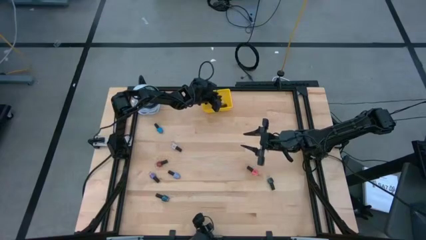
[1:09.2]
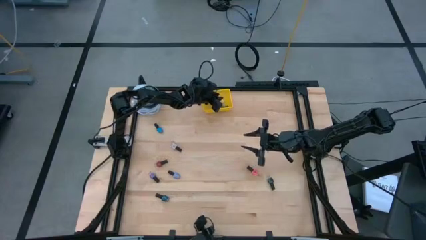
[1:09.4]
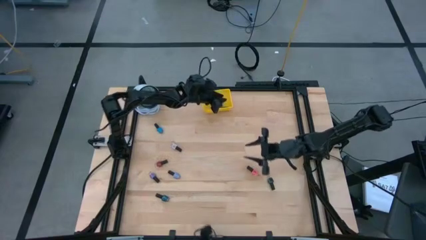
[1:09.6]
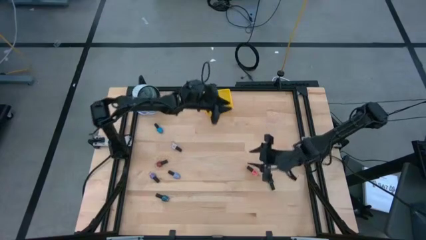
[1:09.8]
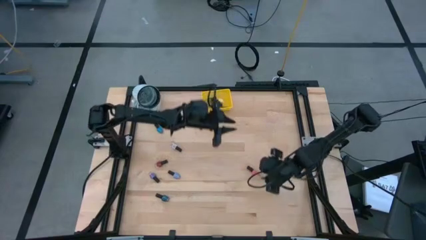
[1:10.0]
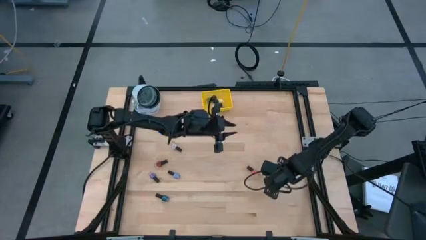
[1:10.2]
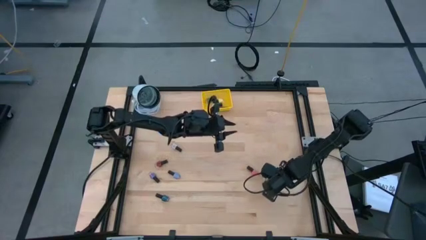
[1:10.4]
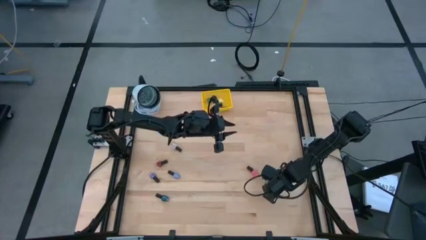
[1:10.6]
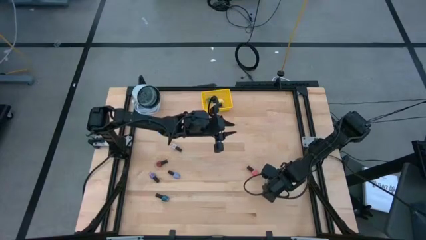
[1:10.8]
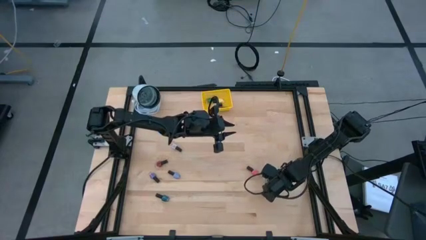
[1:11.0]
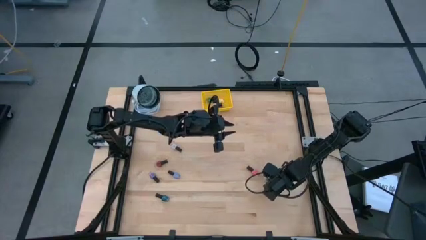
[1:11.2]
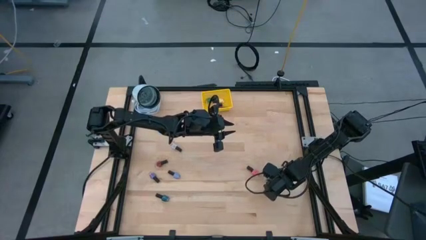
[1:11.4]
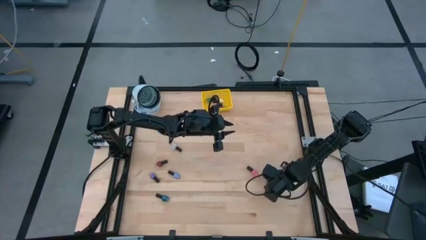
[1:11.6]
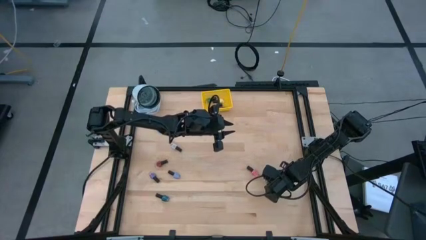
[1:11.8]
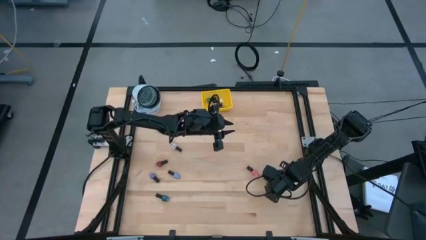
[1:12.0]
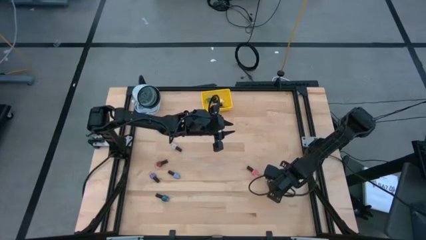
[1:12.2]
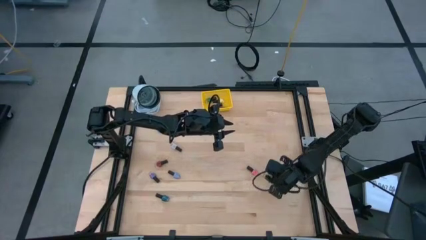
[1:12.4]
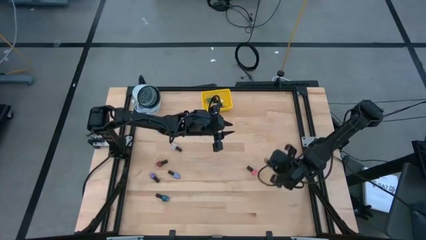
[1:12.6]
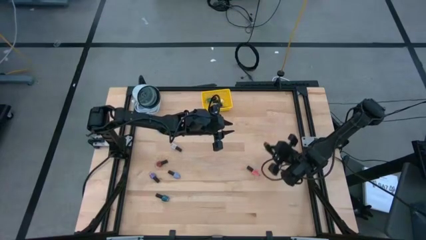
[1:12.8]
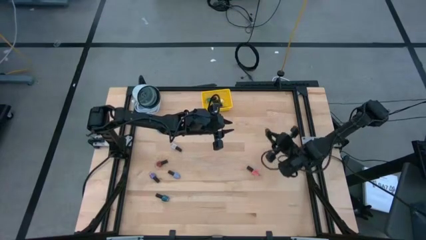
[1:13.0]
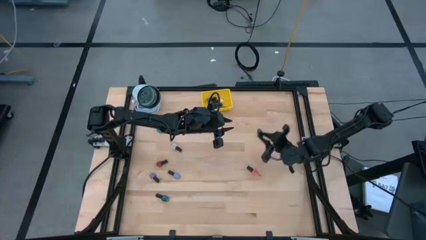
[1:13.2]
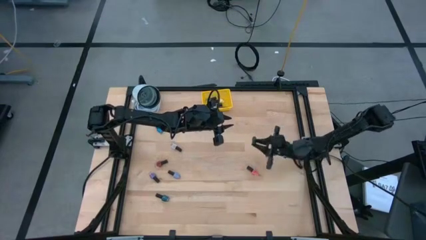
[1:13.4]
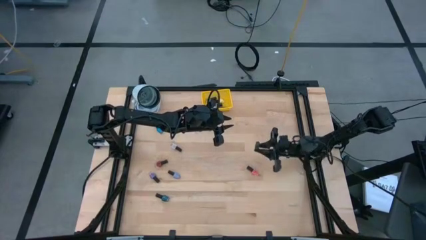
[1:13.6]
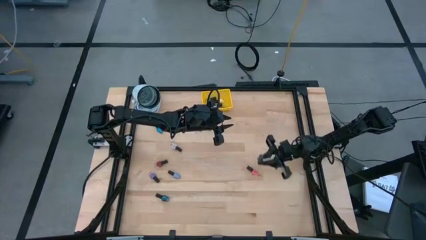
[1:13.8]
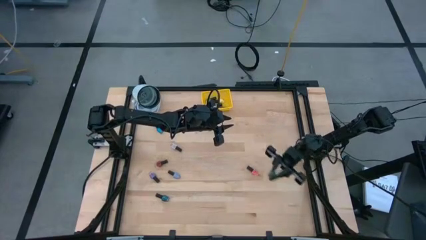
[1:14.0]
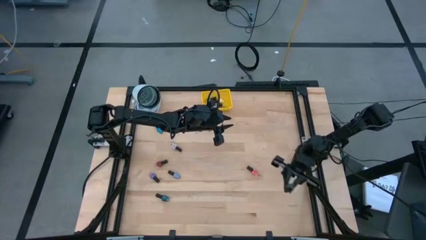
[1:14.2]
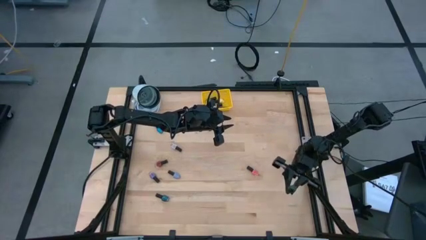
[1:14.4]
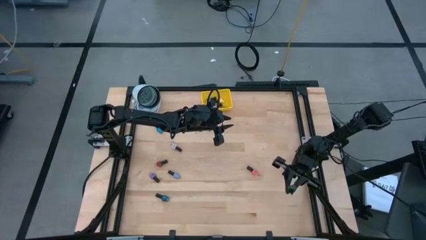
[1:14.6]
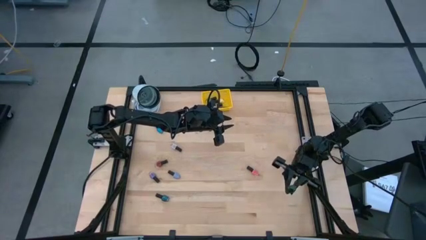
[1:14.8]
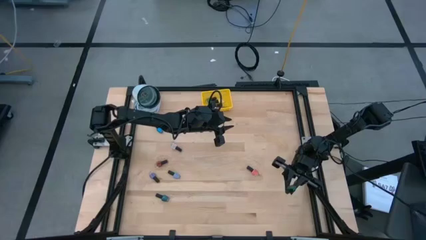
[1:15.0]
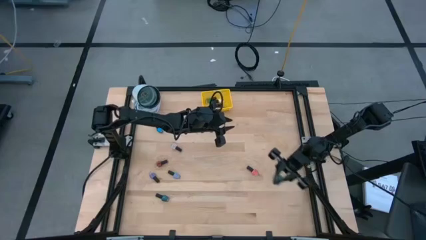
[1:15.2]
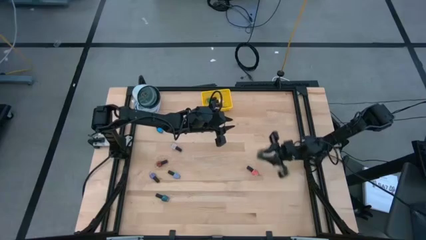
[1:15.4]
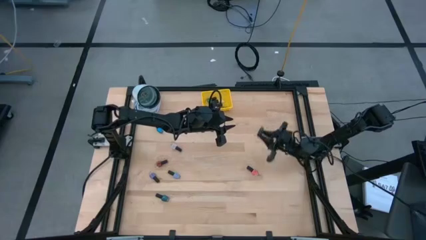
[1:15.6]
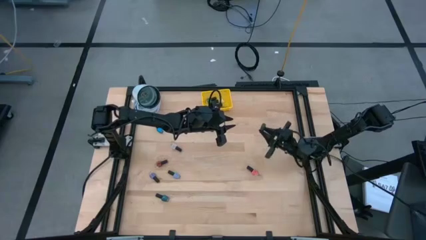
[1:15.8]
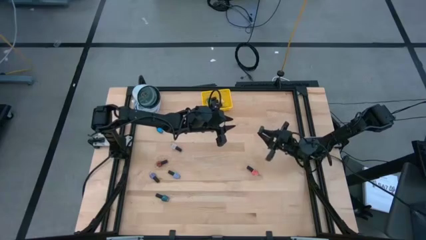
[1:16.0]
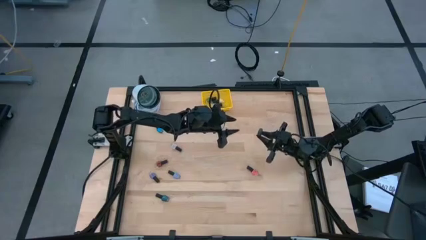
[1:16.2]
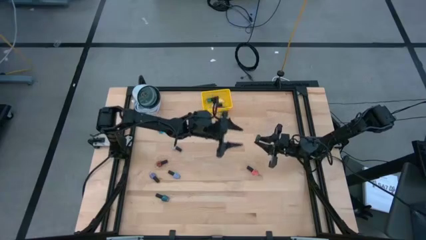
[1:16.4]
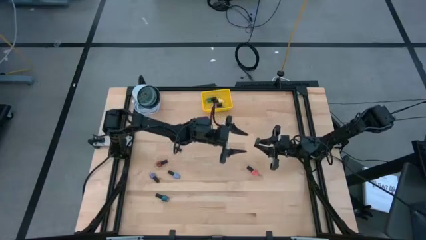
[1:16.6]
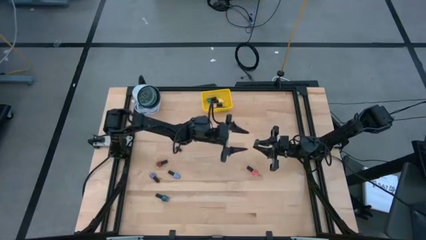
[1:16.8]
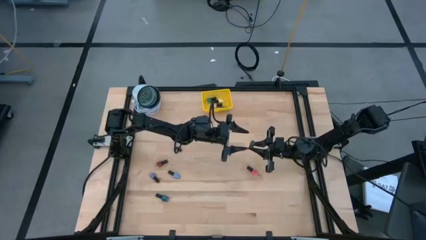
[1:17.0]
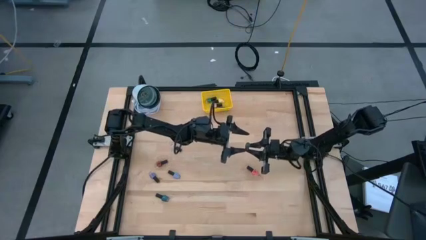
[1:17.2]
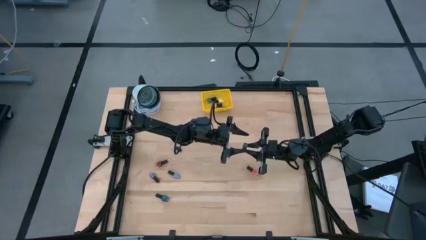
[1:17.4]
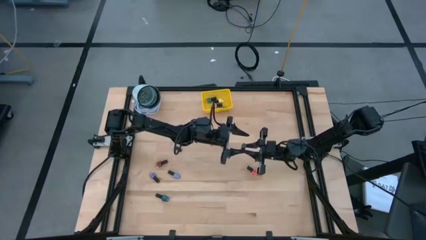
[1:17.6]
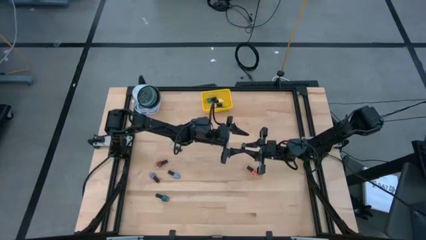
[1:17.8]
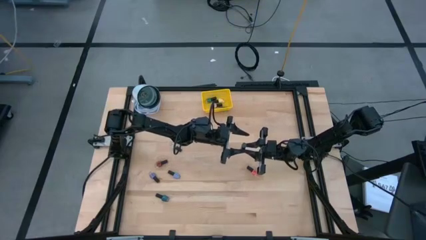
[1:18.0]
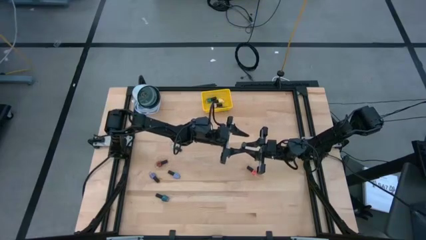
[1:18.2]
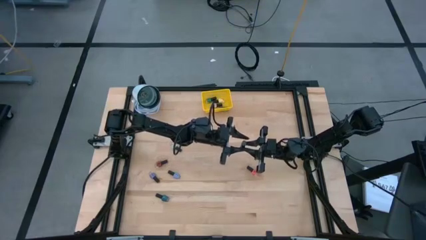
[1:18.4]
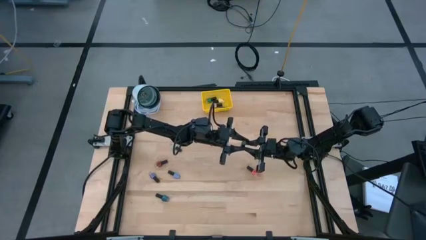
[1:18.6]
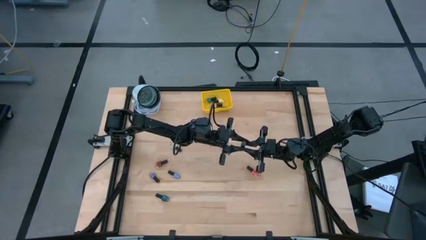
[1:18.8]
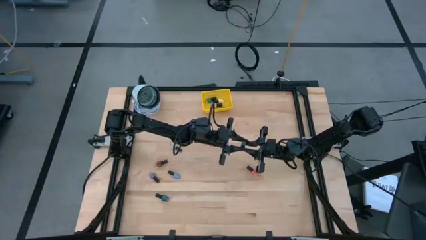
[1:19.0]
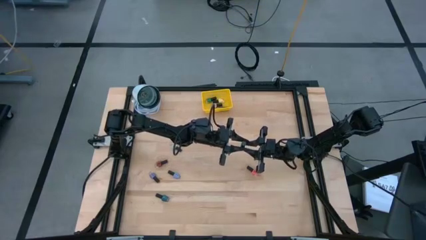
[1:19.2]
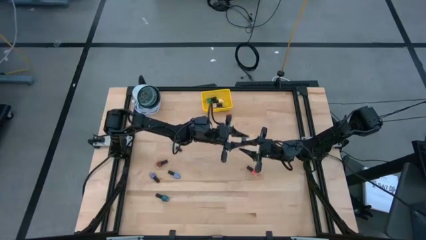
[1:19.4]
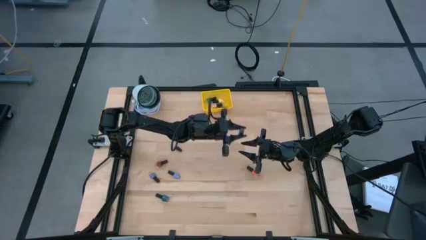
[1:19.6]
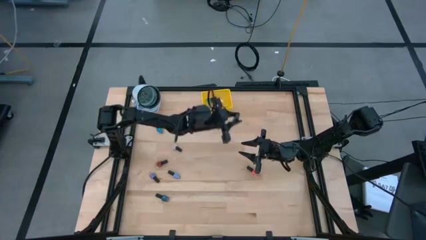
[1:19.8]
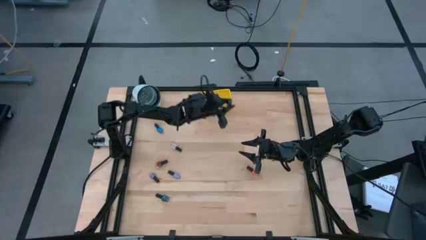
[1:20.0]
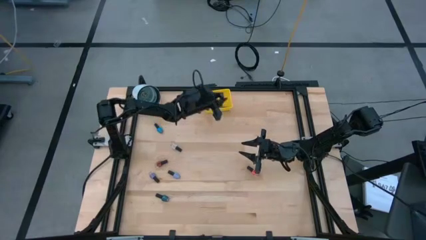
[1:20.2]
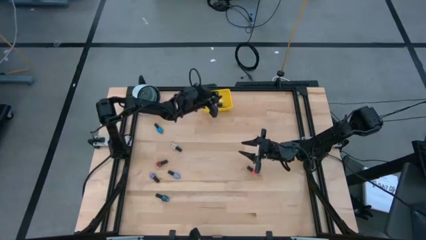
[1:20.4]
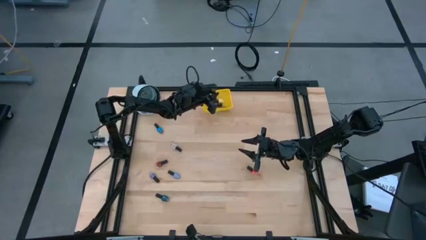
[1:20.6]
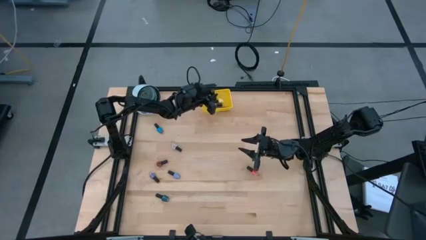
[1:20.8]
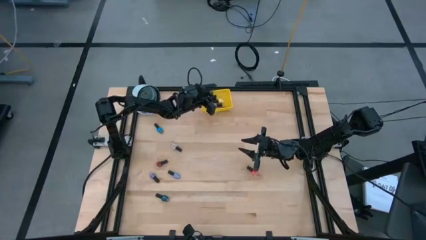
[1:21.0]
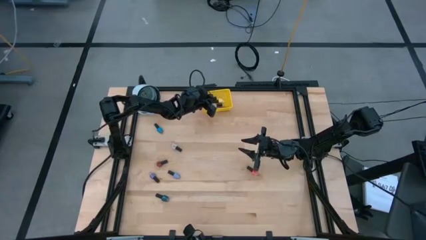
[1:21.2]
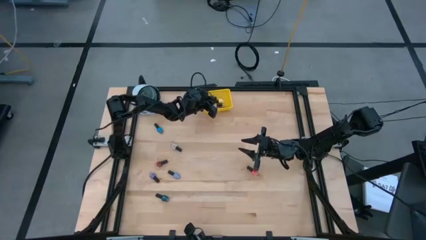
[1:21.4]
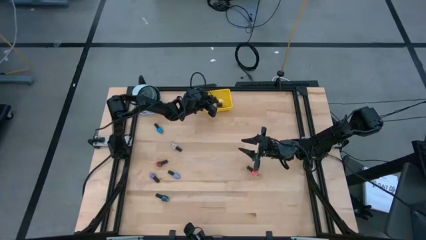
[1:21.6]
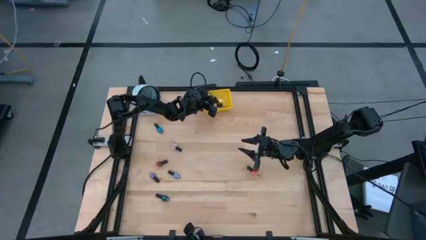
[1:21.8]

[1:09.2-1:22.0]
Task: Pick & Place Nail Polish
Put the dark green nail polish bottle into the yellow bin
